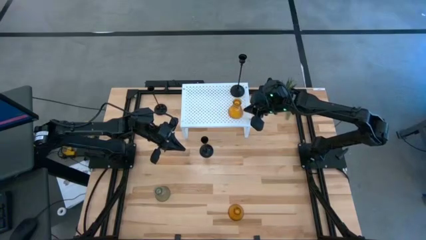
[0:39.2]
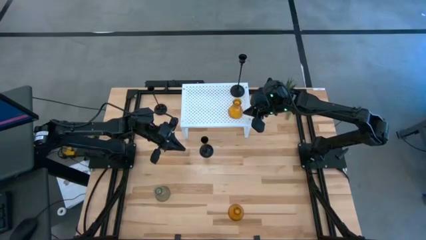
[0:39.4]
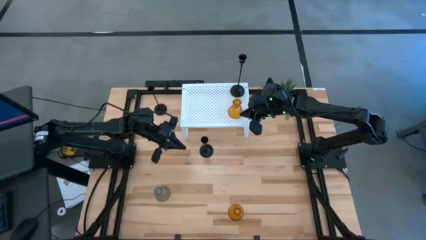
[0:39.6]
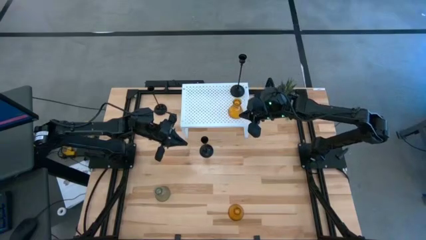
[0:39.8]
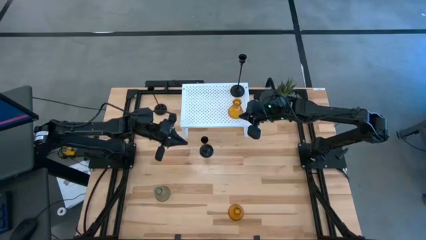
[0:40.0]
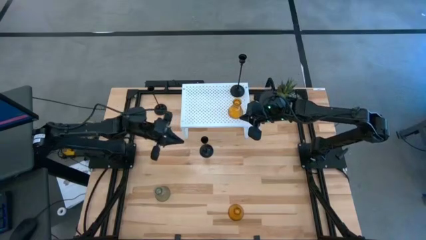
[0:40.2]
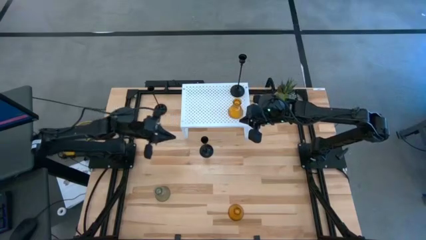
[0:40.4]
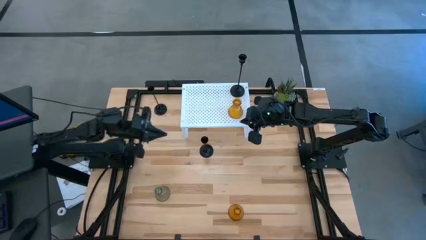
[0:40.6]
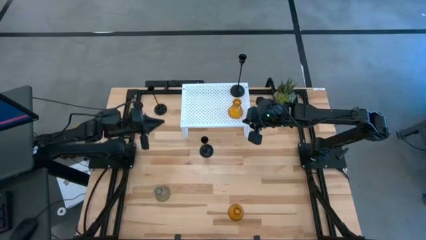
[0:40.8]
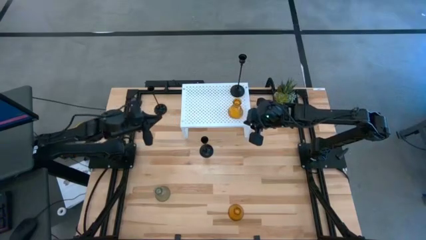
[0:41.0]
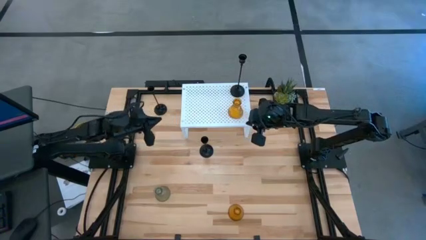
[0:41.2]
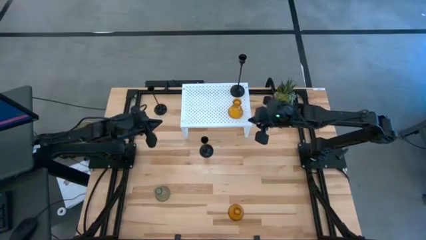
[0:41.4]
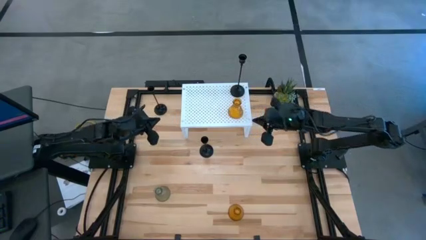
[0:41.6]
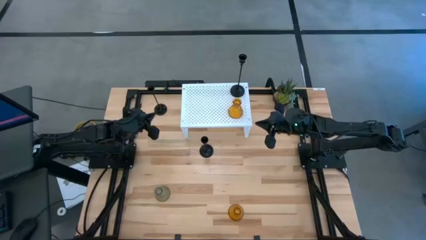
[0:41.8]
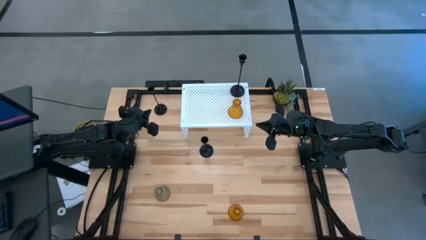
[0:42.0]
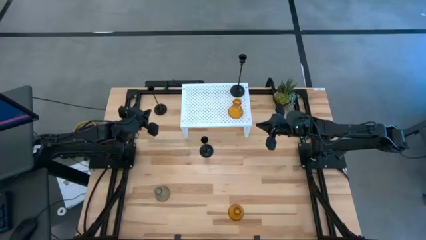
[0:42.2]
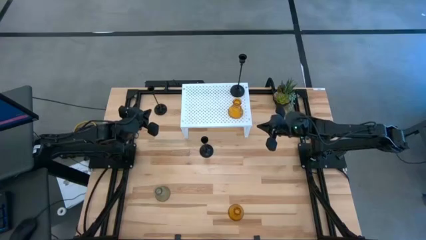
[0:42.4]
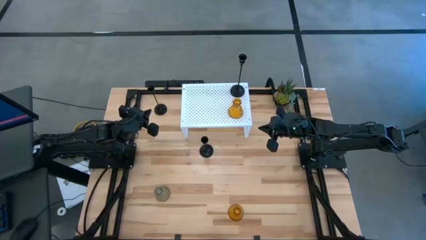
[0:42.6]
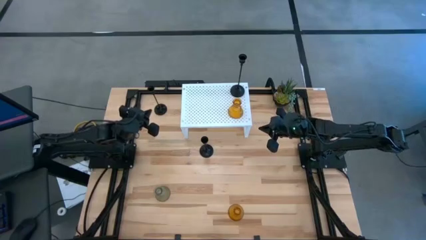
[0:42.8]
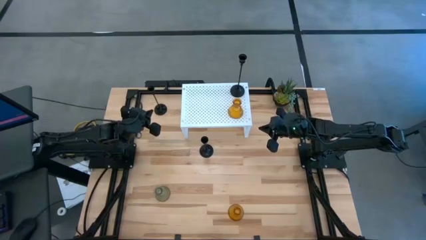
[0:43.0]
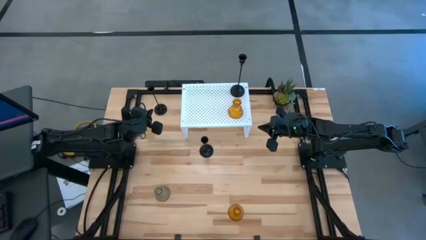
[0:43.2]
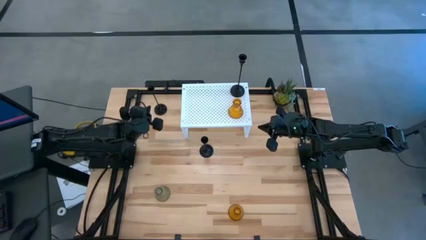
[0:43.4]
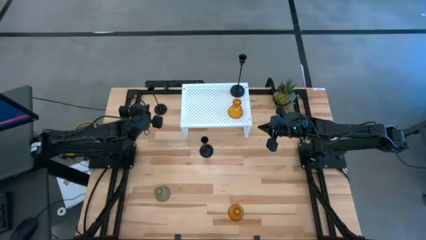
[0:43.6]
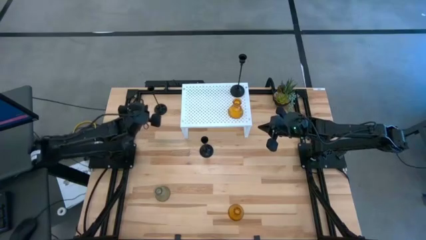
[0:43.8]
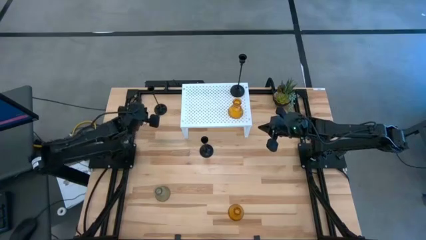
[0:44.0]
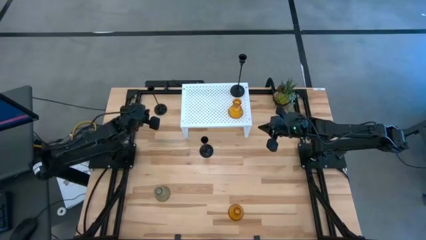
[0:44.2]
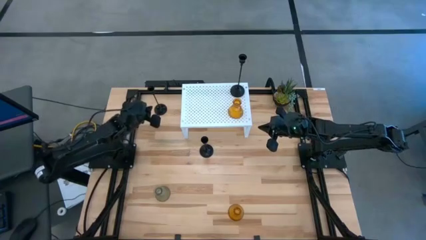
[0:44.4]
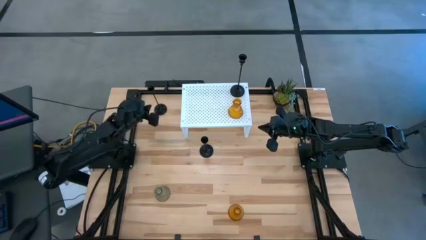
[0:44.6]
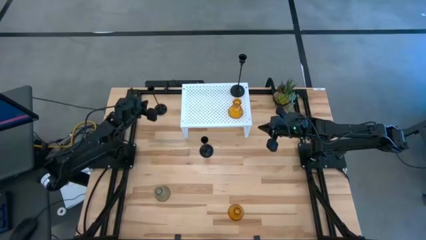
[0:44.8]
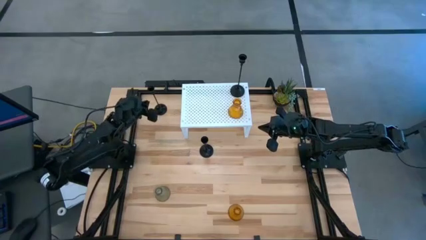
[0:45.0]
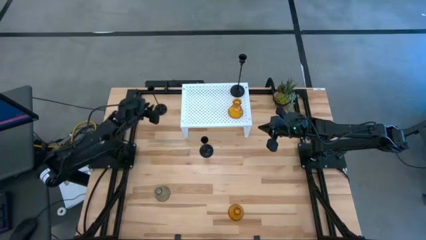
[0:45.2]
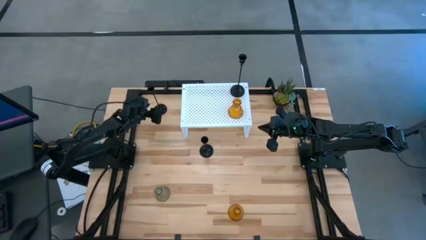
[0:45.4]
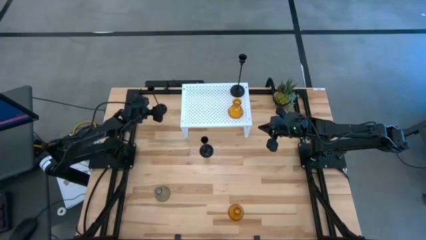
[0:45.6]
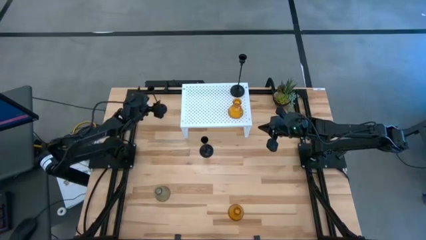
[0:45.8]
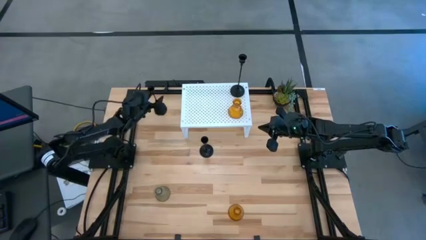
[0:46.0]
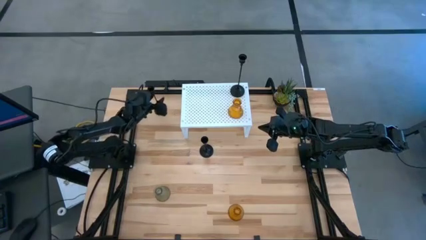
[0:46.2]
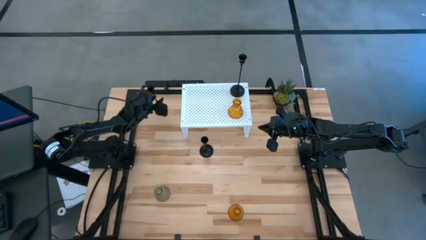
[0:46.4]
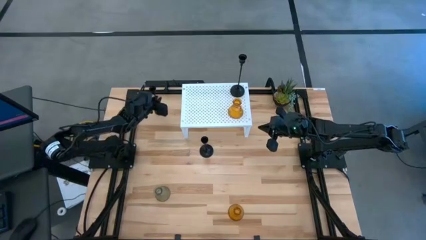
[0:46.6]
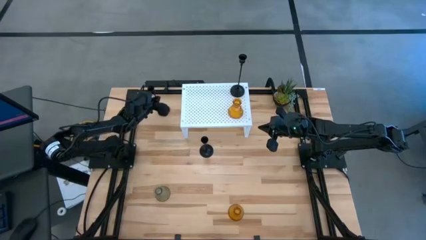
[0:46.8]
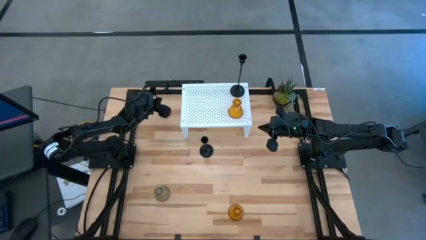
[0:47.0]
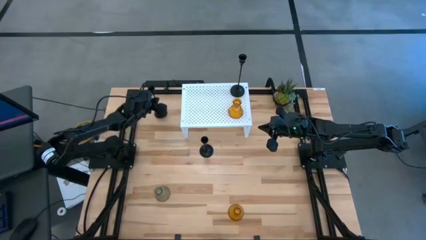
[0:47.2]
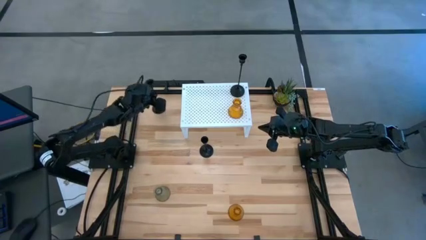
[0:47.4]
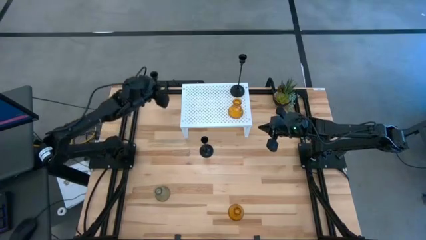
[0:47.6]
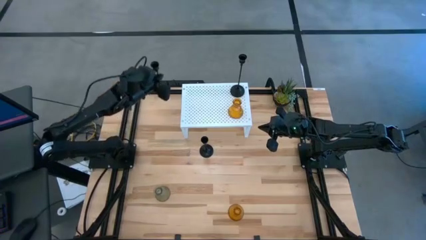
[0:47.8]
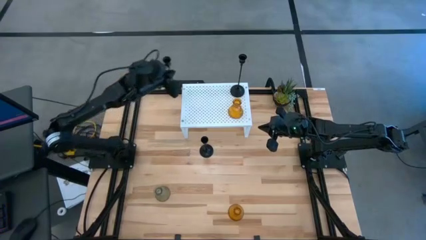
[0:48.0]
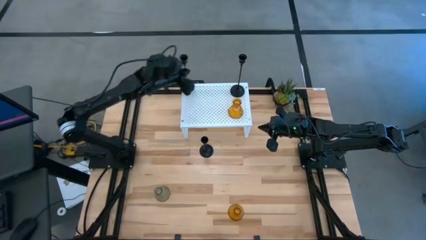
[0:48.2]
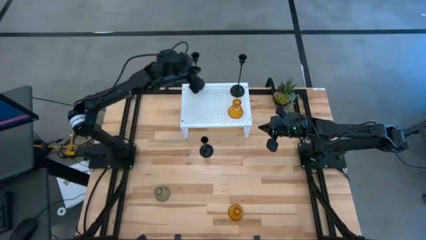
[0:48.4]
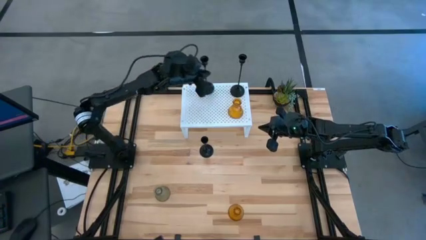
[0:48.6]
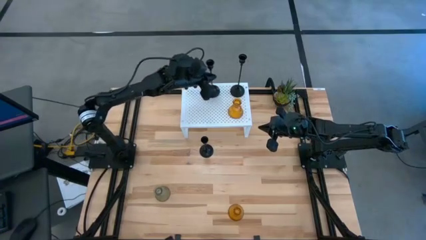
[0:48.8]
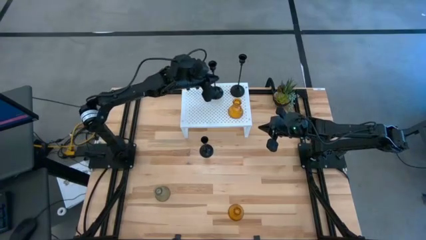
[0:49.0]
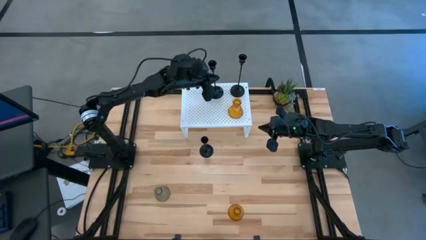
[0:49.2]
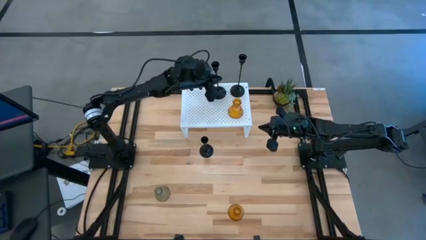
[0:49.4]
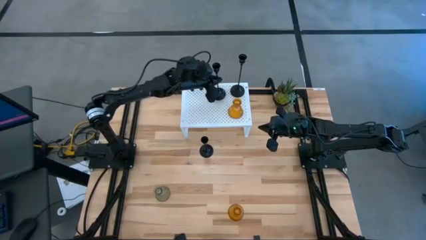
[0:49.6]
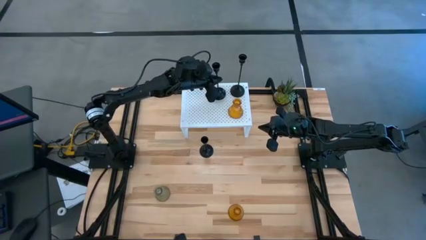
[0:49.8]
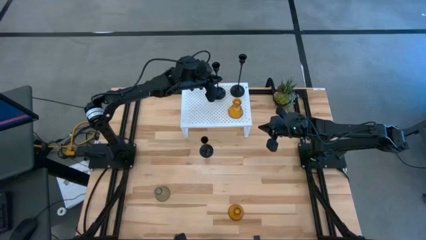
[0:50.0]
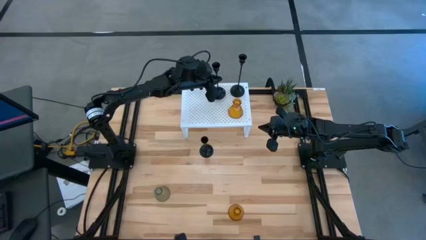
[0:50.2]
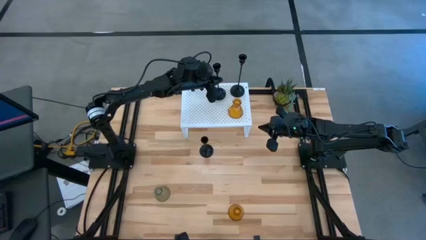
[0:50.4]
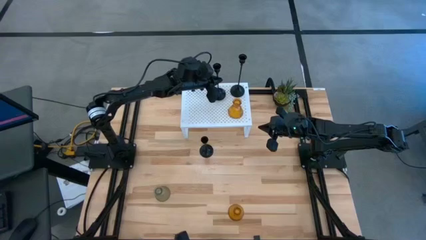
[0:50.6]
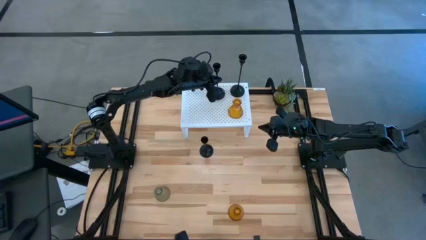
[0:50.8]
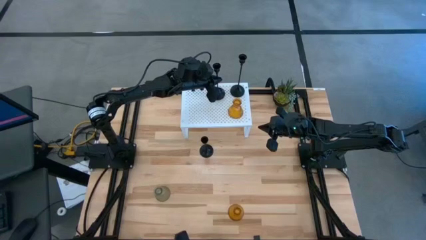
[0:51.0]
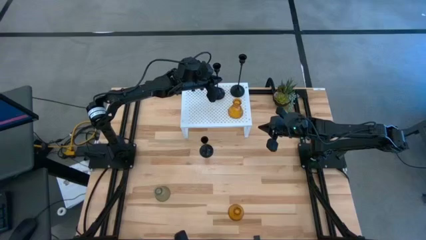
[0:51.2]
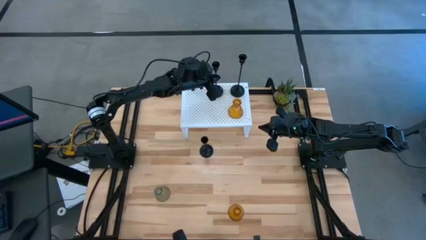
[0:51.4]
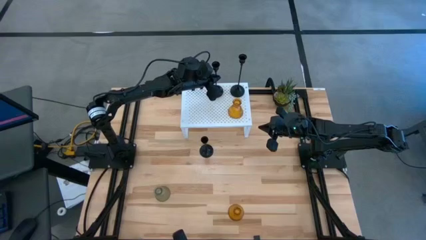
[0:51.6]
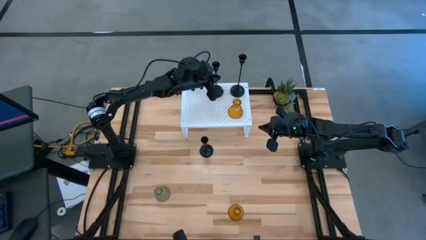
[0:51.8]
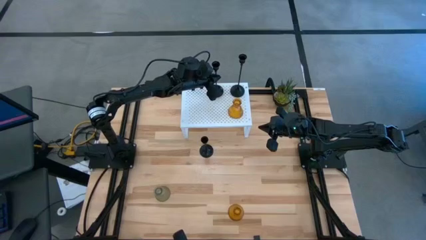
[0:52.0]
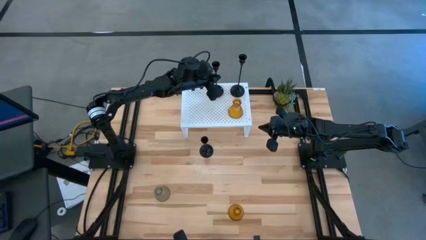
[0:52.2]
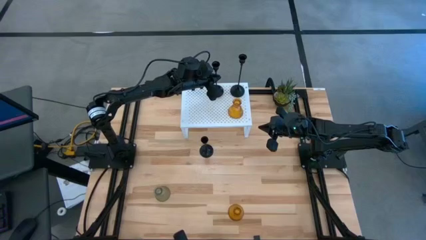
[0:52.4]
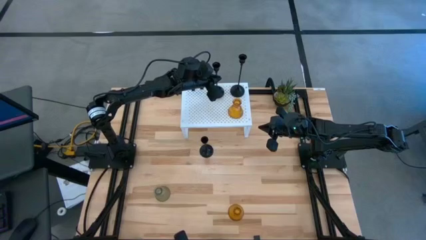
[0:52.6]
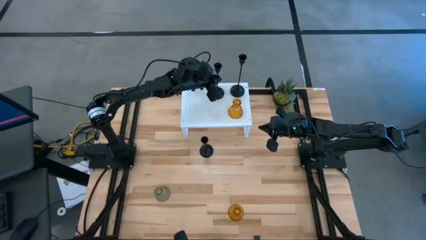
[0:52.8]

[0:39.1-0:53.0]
Task: Pick & Place candle stick holders
Put the top black candle holder on the shelf

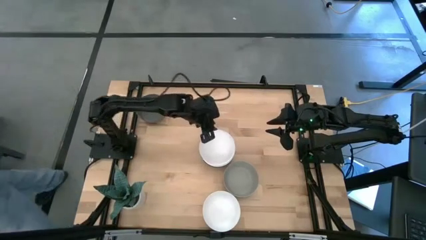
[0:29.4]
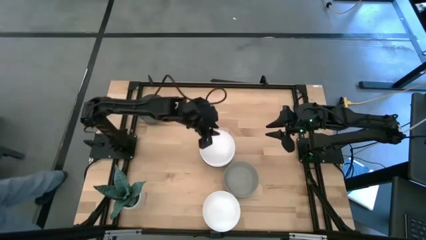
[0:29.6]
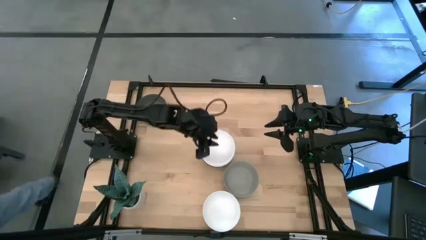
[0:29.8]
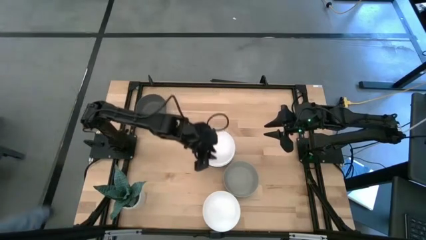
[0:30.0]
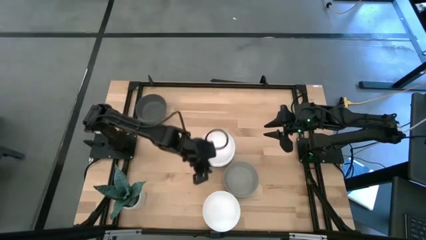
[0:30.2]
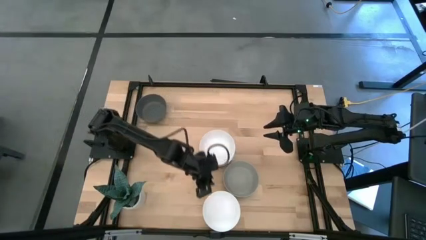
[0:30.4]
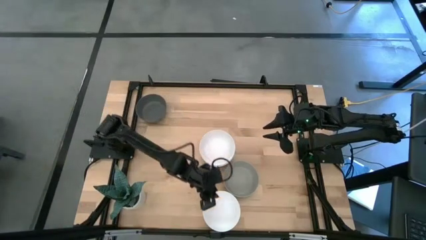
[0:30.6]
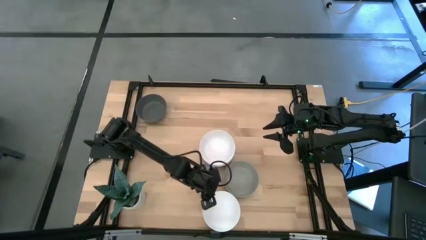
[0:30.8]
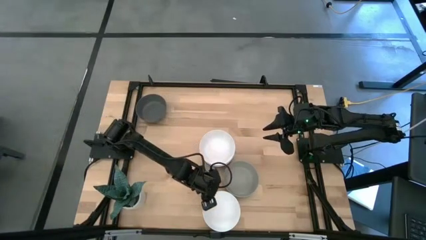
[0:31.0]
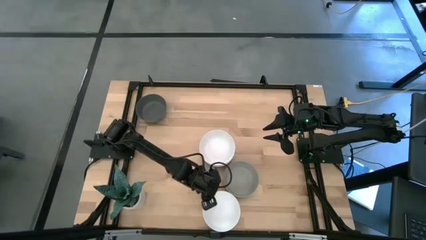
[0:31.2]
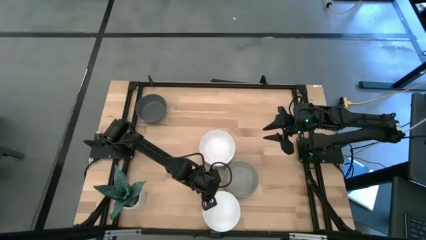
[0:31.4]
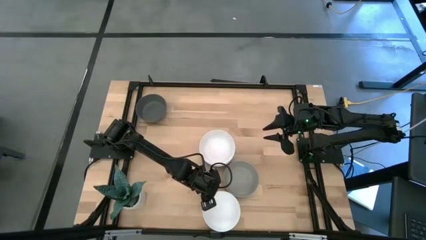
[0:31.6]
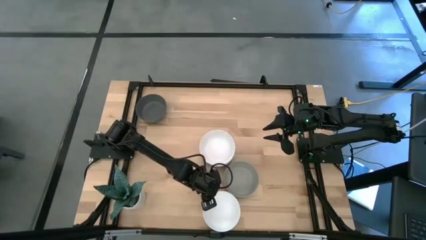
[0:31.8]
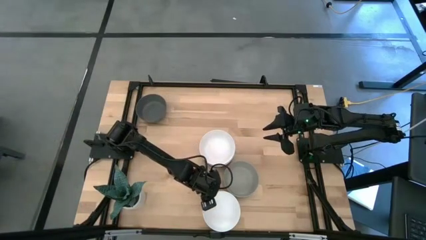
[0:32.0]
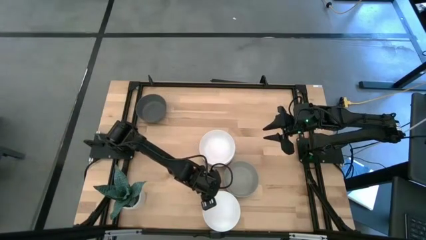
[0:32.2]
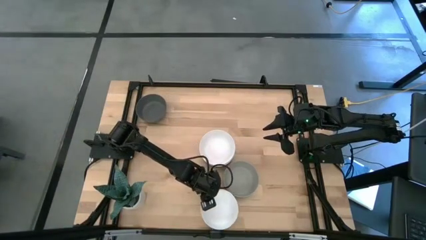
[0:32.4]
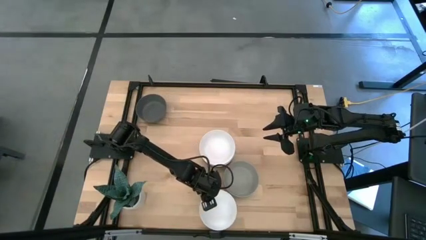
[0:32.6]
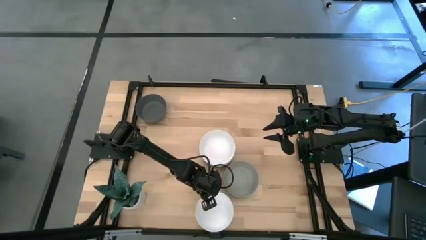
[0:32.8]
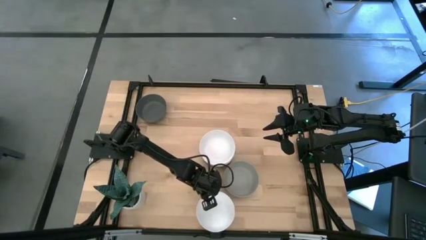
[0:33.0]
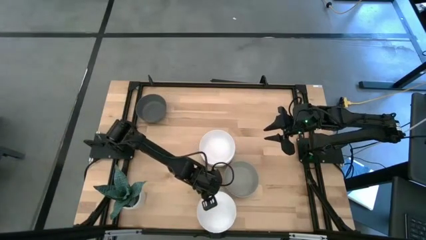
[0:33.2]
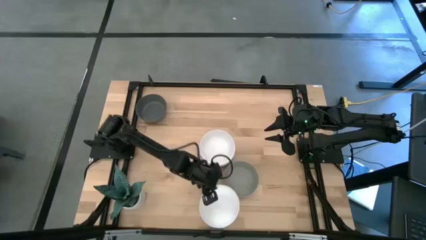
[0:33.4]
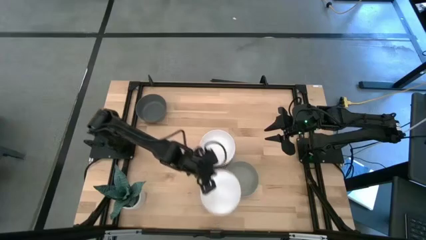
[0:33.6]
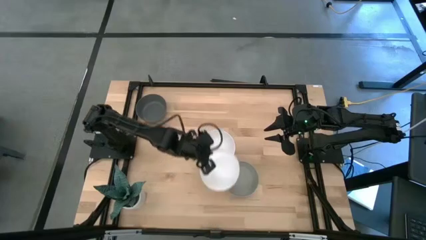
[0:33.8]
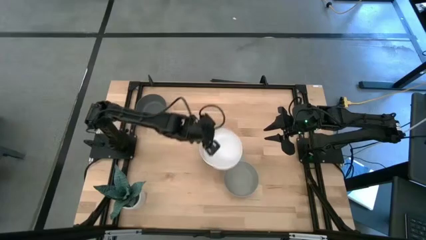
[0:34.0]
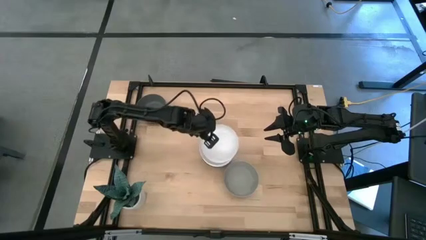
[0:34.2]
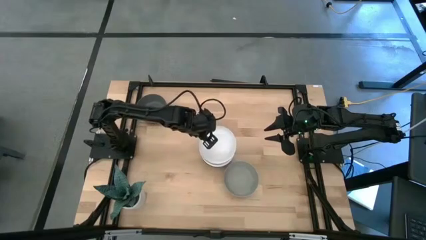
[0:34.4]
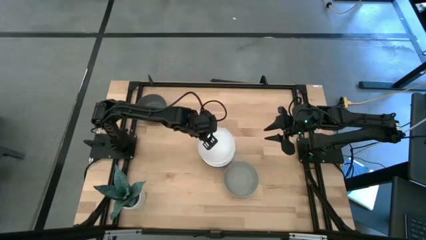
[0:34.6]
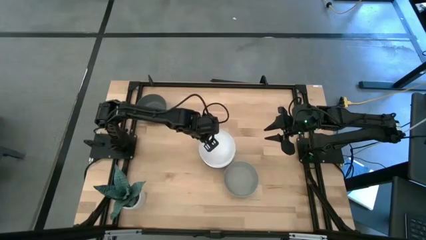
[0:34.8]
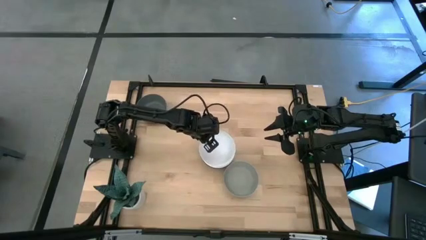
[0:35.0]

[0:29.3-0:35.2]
Task: Nest bowls inside each other
Stack the white bowl on top of the white bowl
